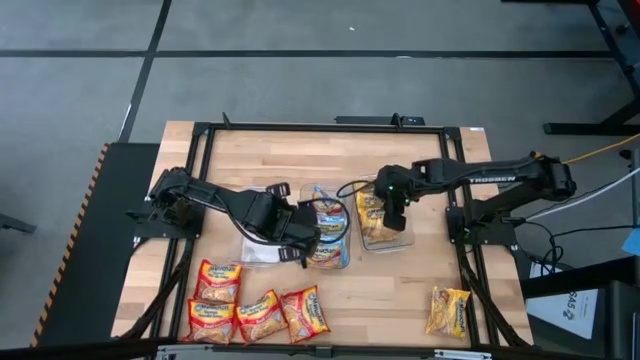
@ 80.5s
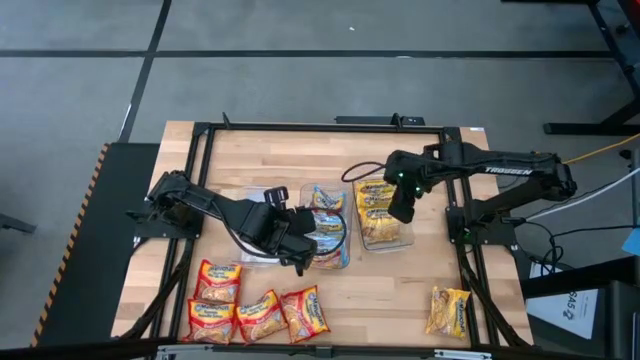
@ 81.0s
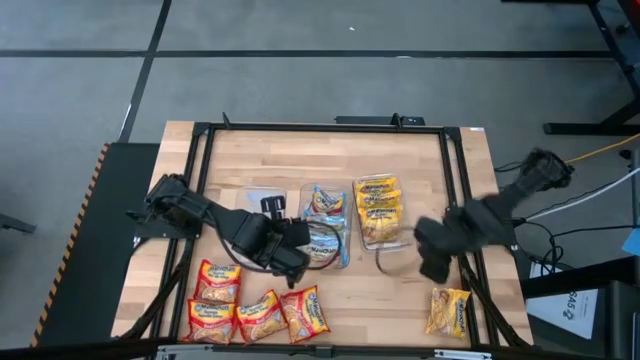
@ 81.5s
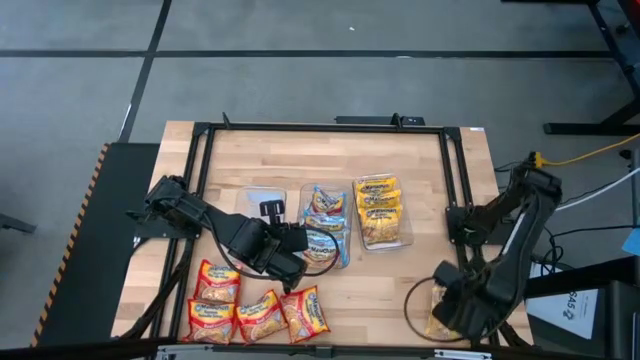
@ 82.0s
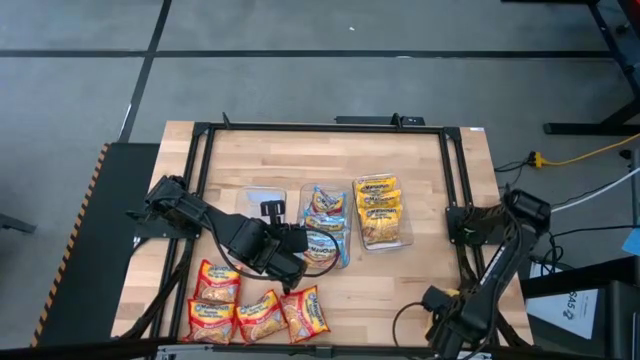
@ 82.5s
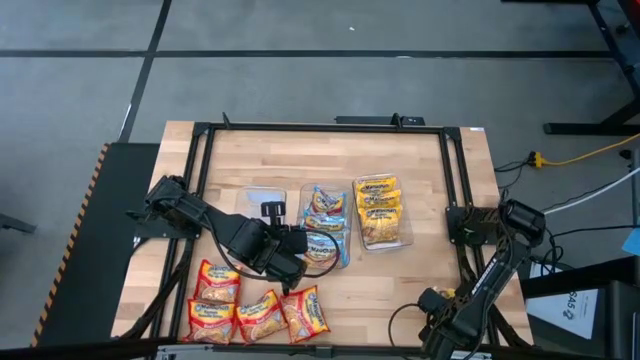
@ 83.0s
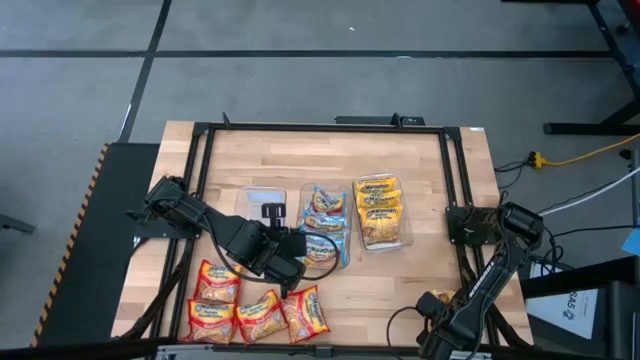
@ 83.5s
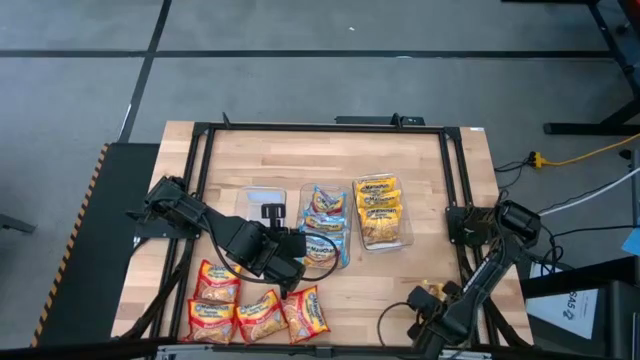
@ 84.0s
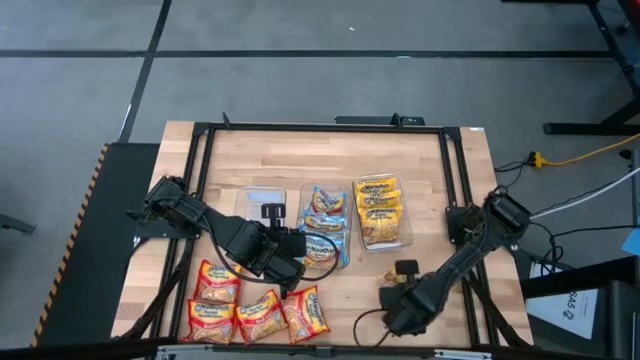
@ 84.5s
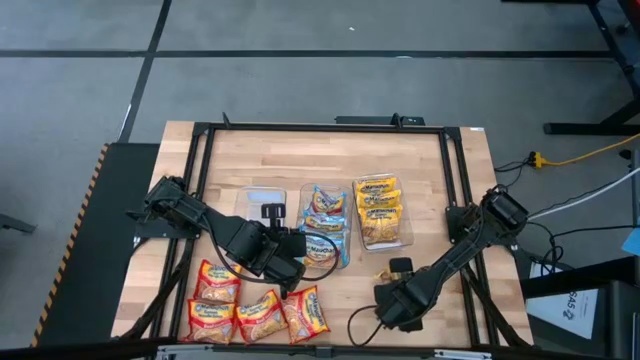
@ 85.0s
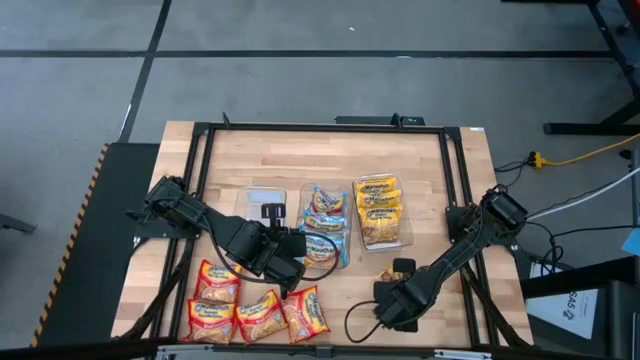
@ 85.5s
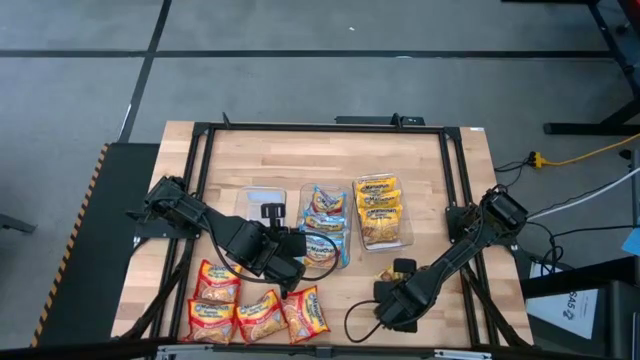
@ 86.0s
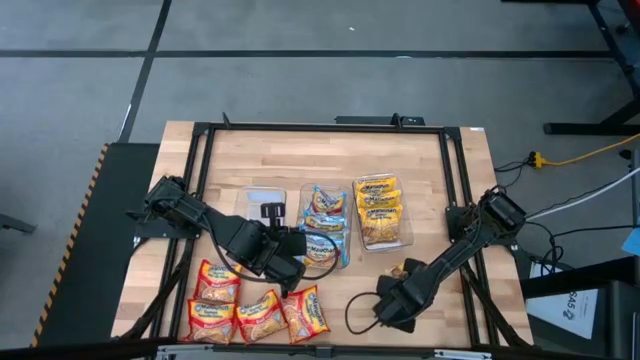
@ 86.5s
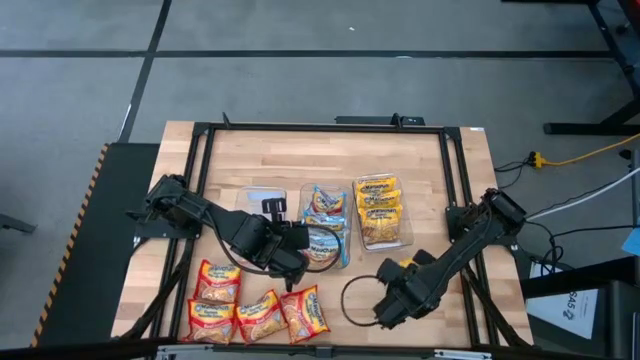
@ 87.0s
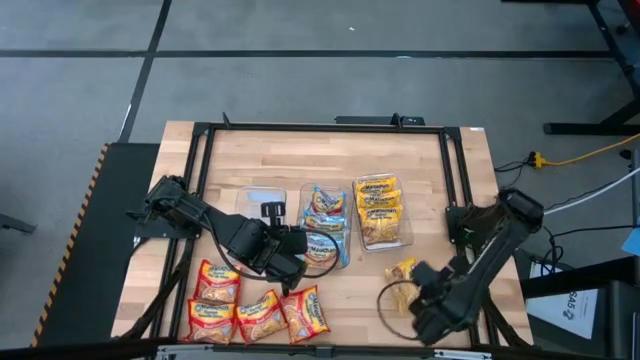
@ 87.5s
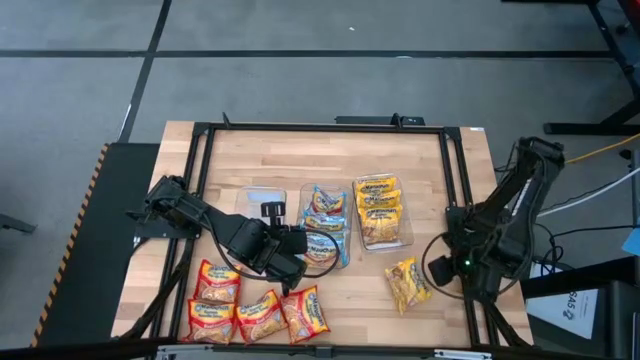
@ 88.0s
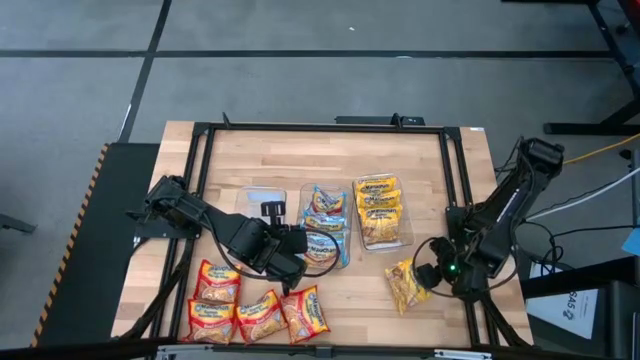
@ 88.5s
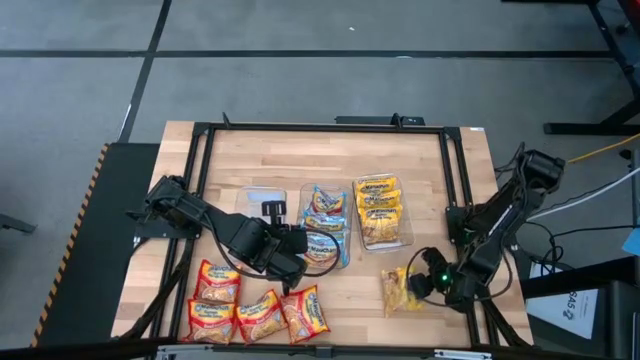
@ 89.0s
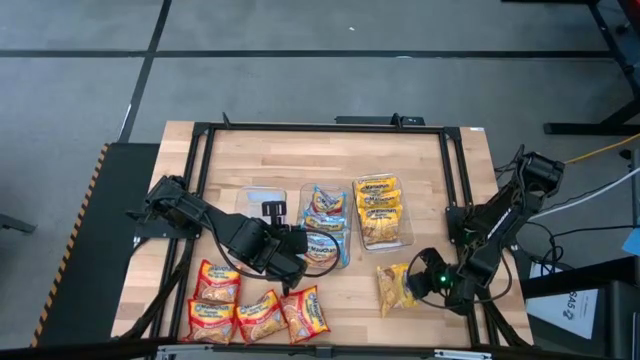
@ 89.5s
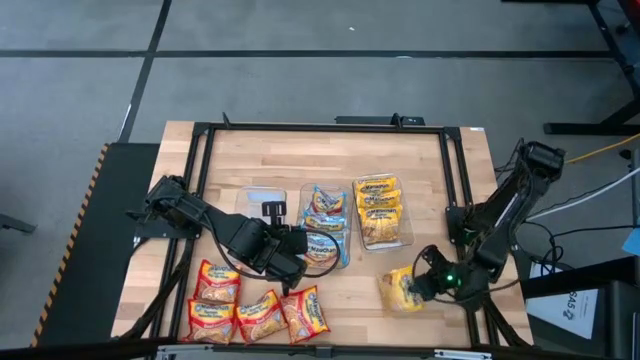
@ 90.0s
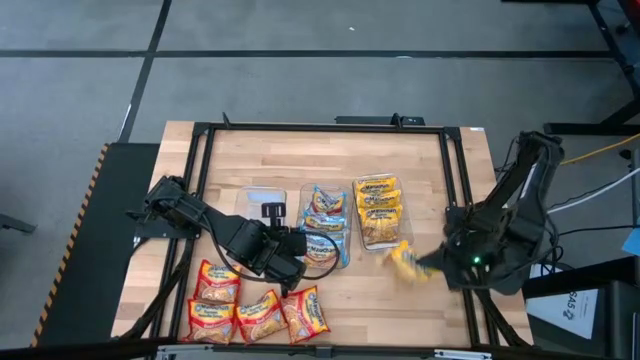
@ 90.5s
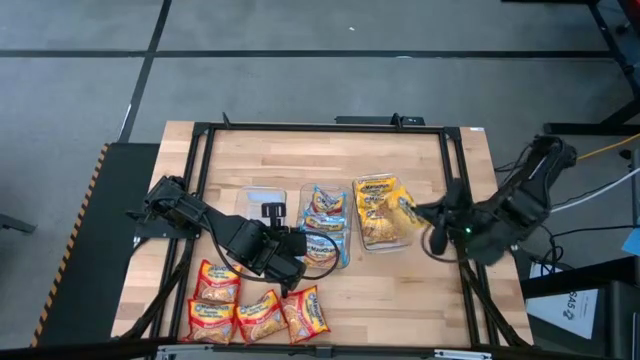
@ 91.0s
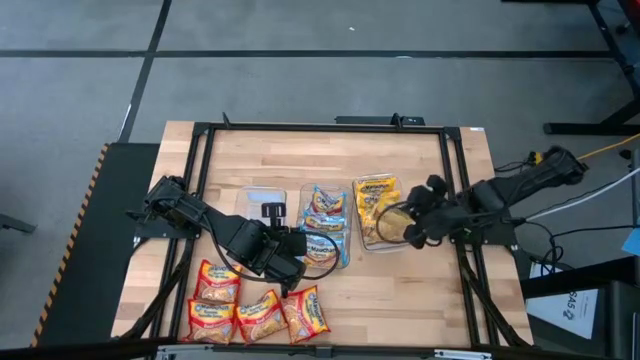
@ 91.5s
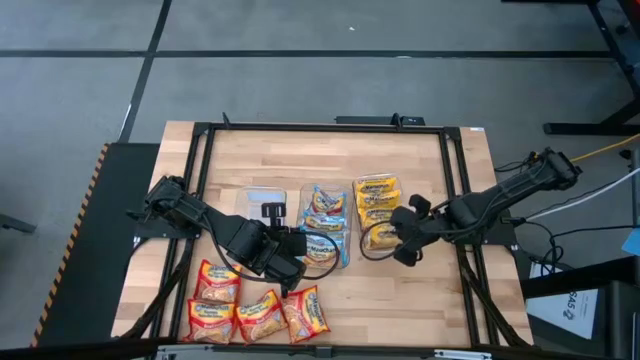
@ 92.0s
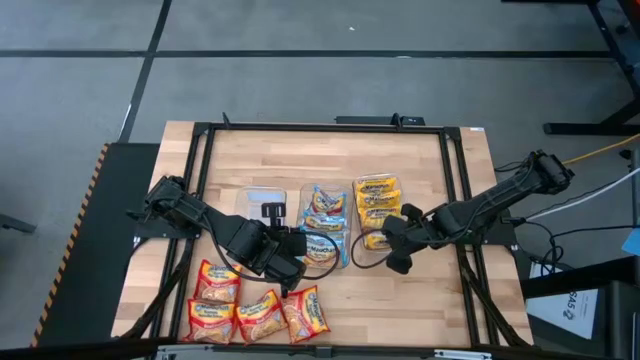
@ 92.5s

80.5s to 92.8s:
Task: Sort Maruchan noodles
Put the yellow noodle pack into the right transparent bin

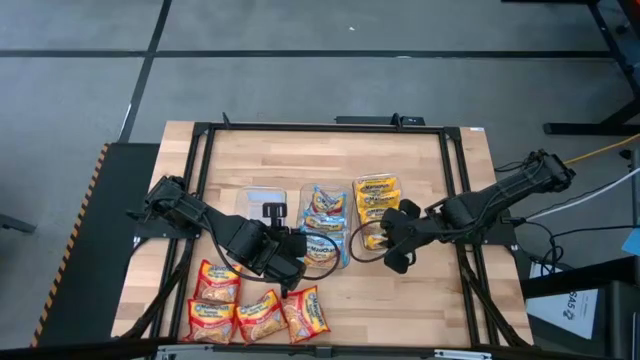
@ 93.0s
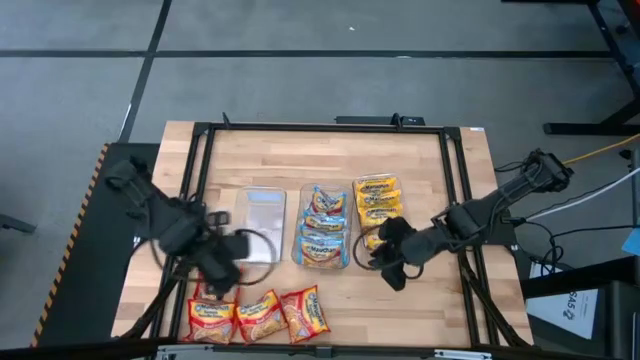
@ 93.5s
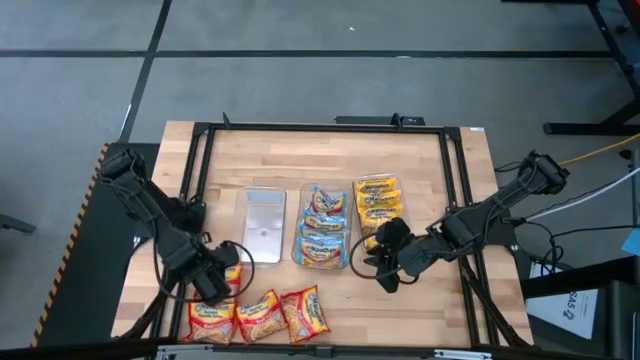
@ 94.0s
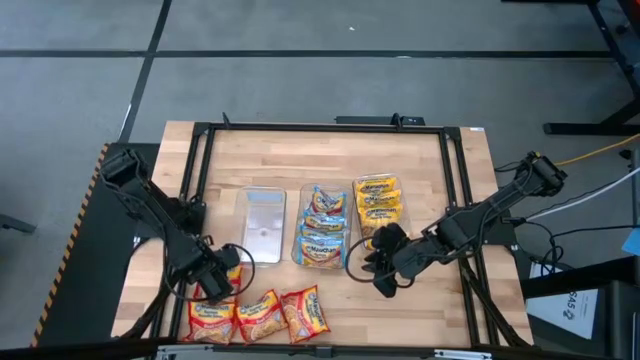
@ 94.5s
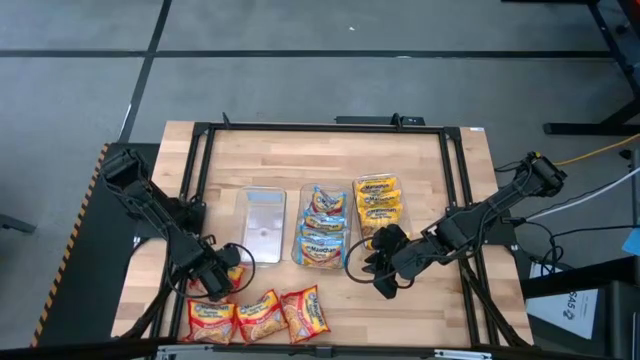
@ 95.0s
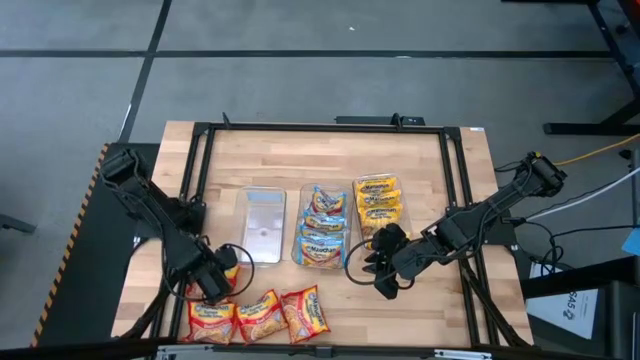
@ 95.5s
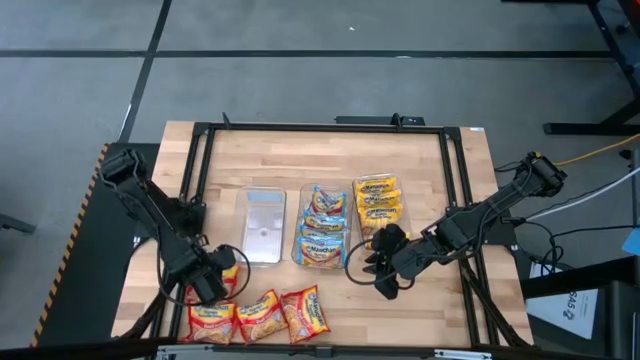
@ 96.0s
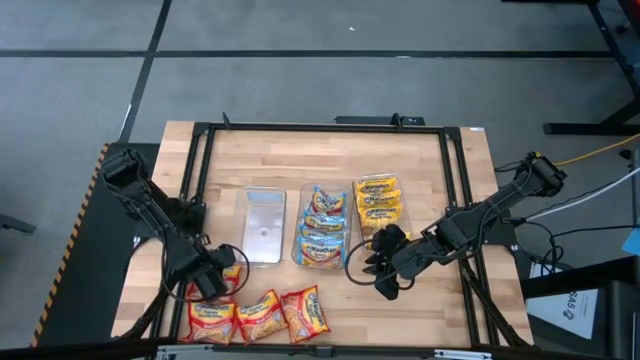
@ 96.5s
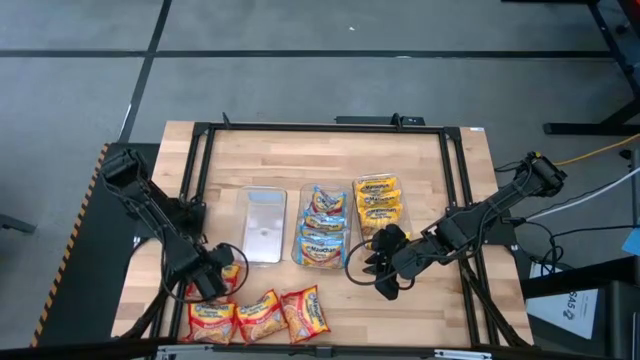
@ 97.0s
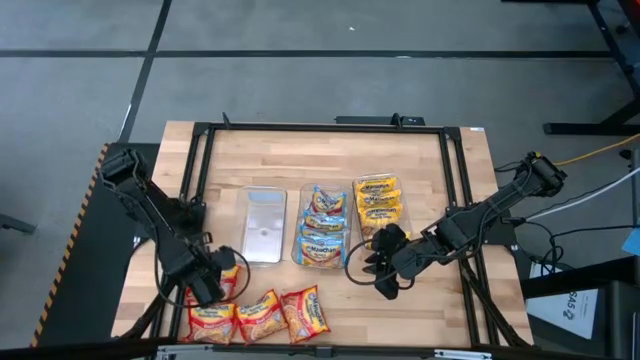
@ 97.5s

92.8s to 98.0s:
Put the red noodle pack into the left transparent bin

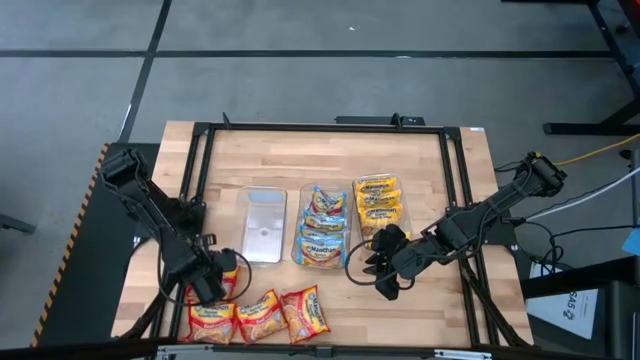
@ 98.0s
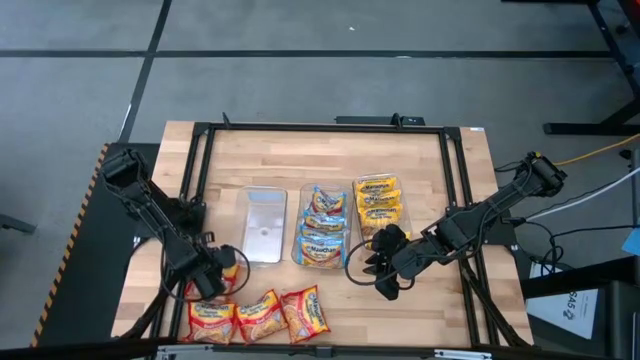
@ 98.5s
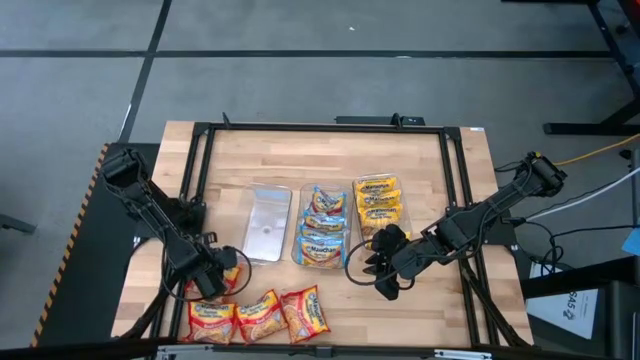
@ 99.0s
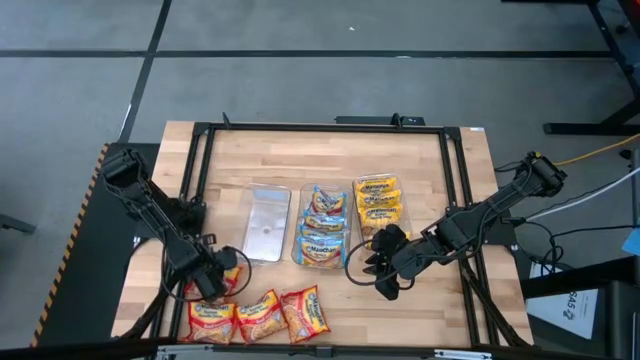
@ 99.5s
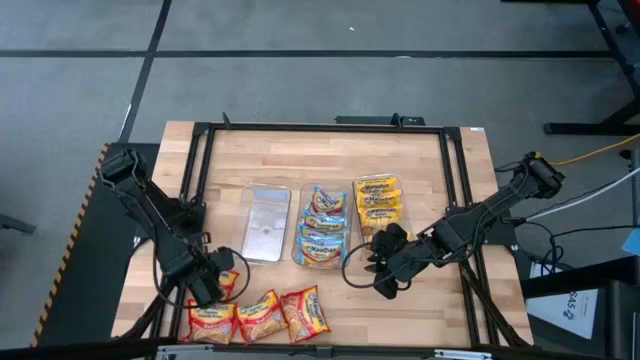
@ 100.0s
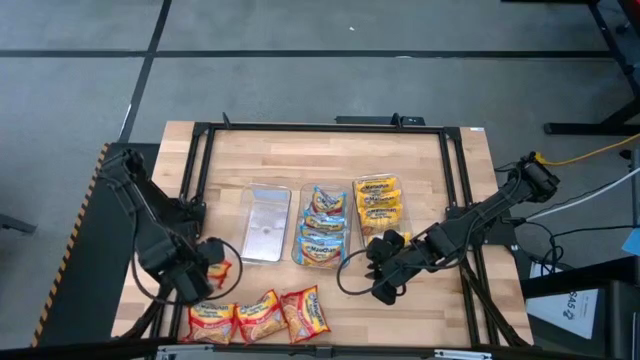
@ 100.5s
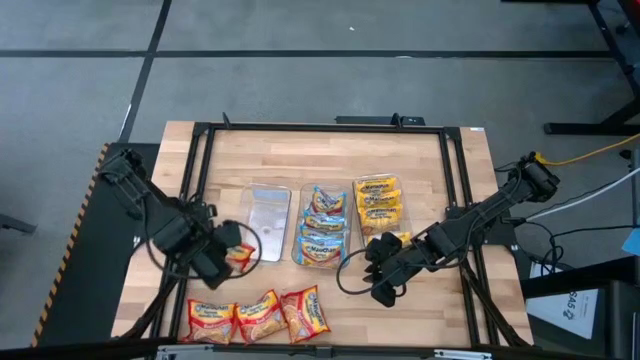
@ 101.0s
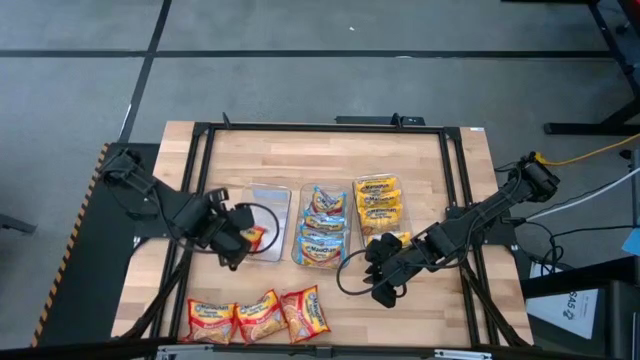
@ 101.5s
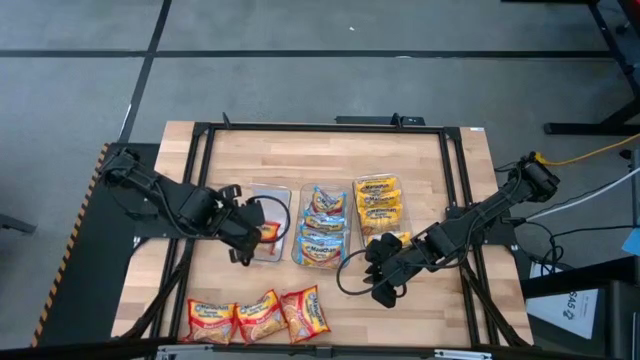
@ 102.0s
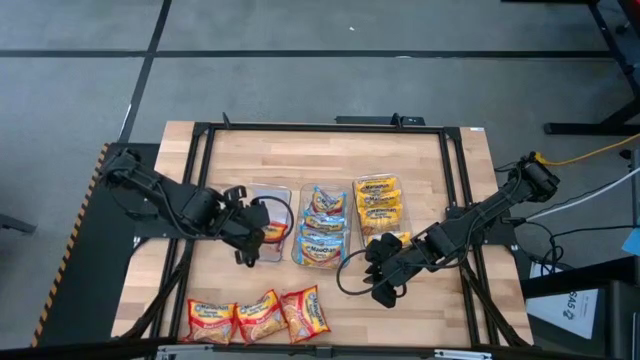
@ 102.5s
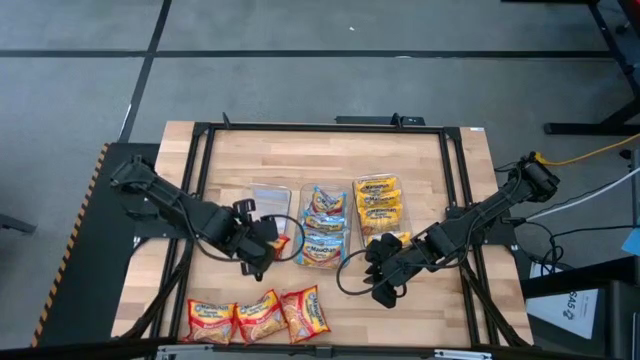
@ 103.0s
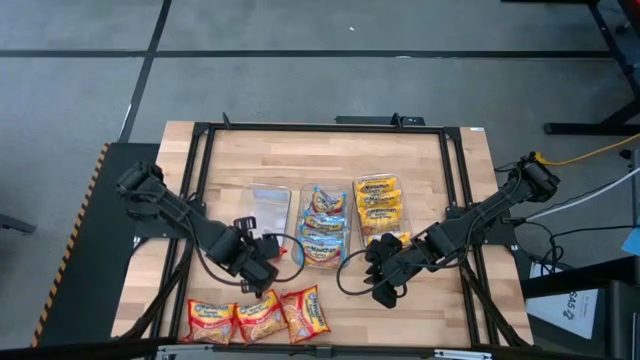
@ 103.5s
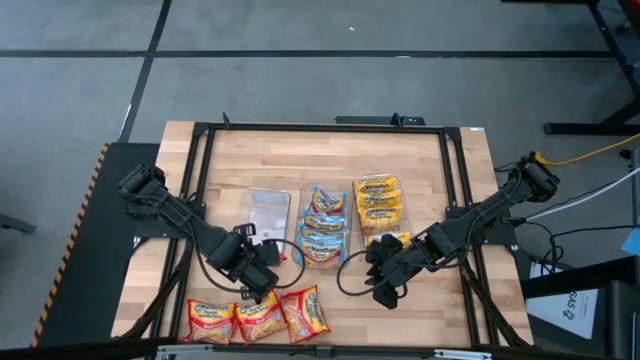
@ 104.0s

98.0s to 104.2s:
Put the red noodle pack into the left transparent bin
